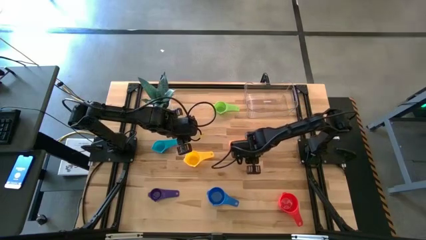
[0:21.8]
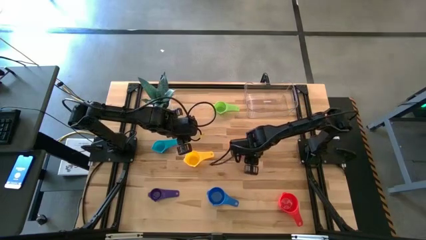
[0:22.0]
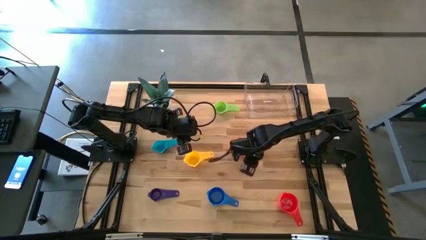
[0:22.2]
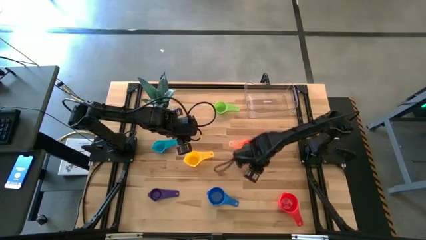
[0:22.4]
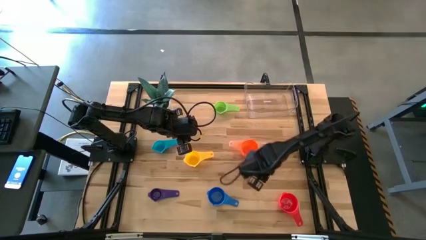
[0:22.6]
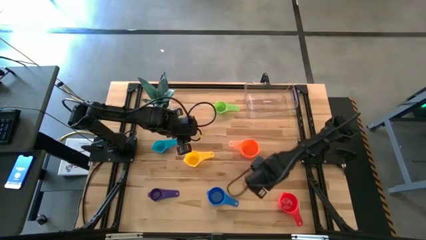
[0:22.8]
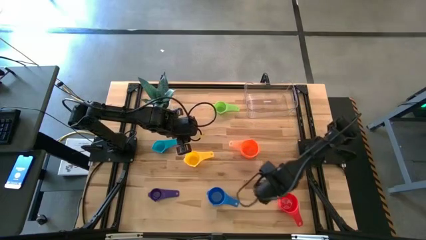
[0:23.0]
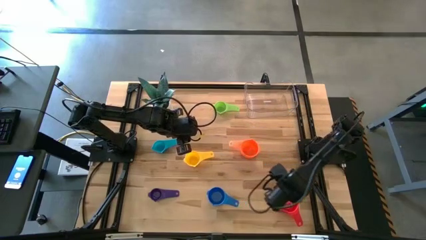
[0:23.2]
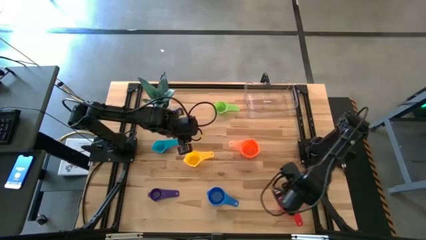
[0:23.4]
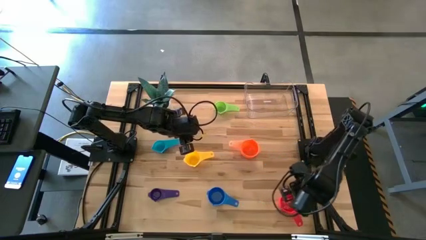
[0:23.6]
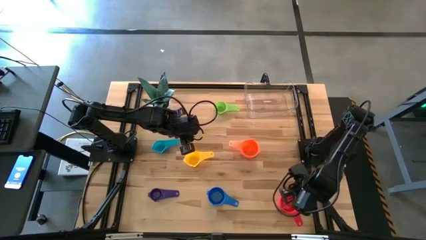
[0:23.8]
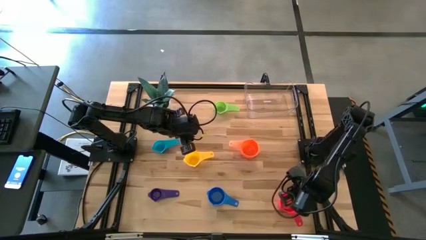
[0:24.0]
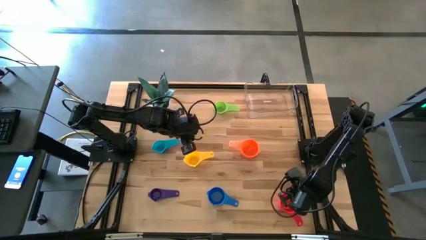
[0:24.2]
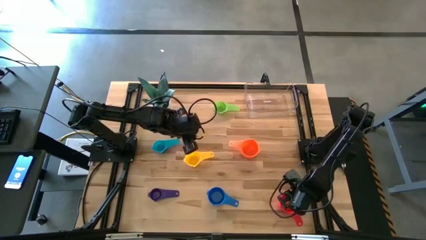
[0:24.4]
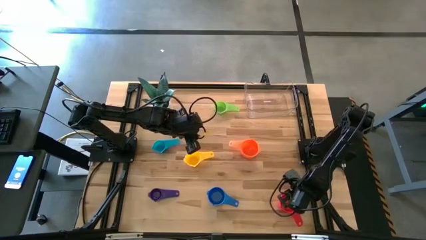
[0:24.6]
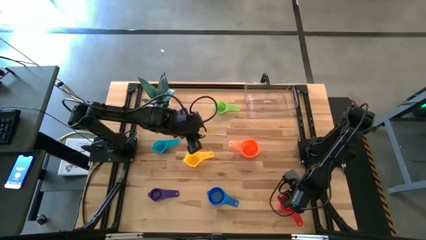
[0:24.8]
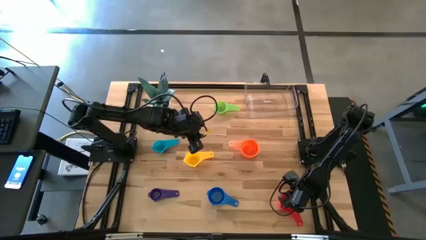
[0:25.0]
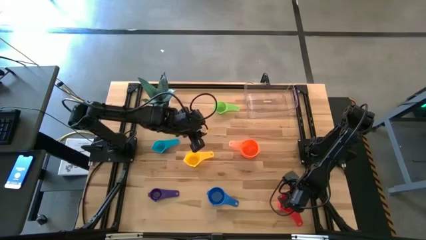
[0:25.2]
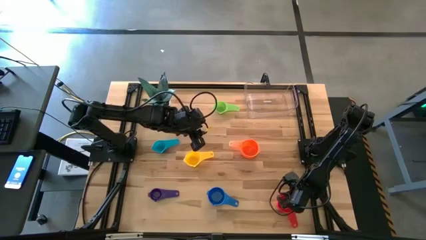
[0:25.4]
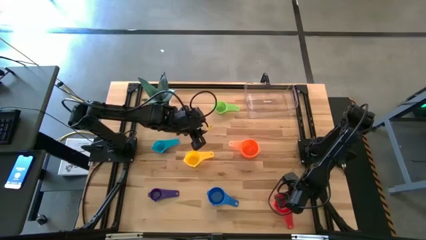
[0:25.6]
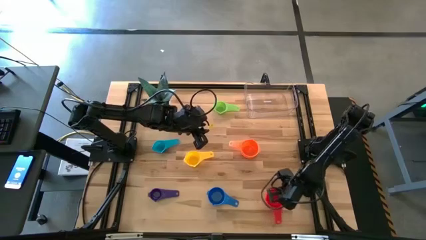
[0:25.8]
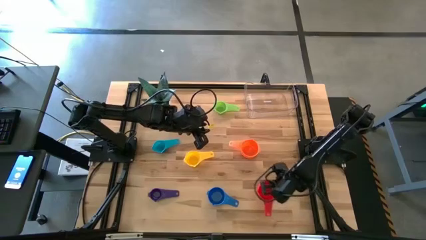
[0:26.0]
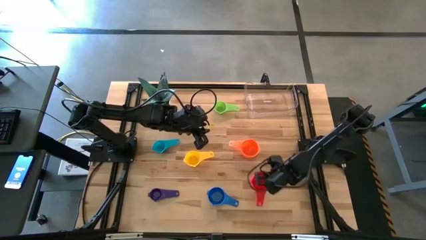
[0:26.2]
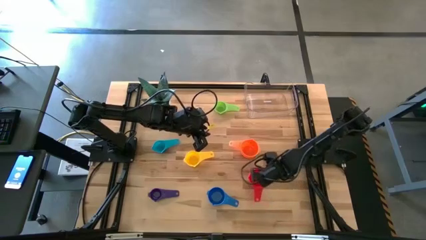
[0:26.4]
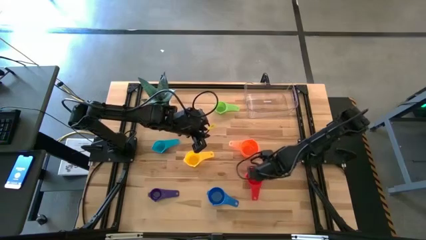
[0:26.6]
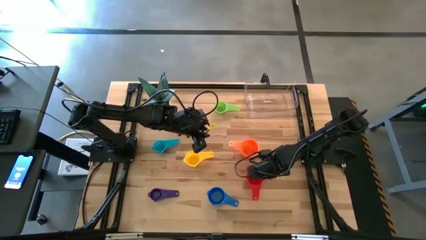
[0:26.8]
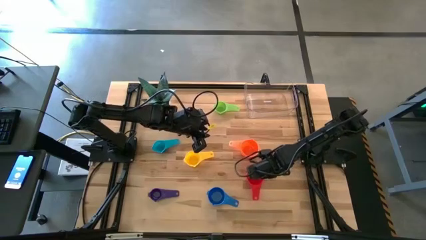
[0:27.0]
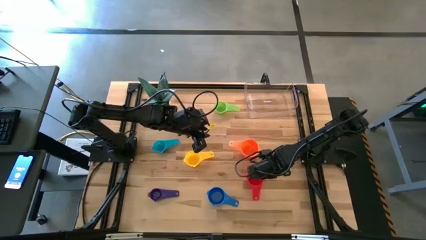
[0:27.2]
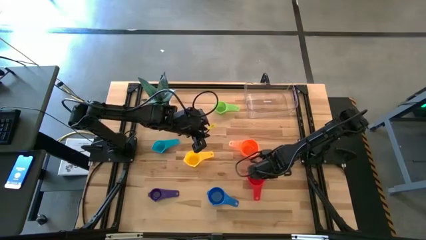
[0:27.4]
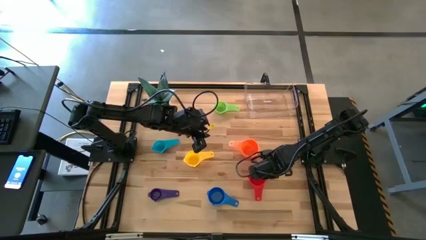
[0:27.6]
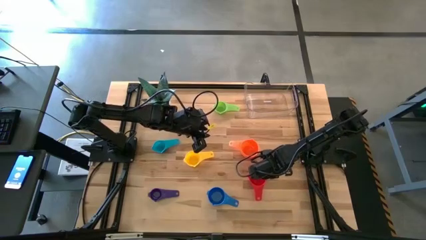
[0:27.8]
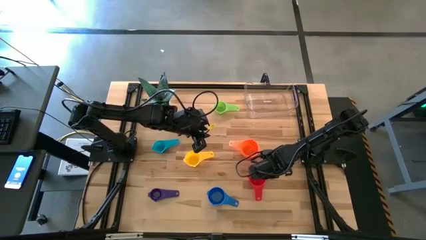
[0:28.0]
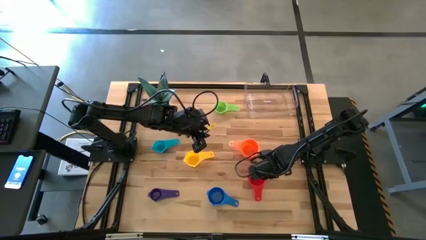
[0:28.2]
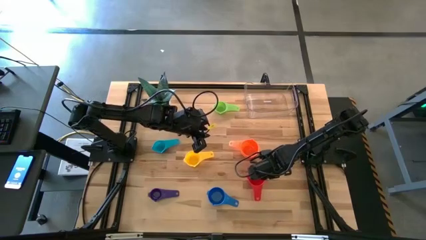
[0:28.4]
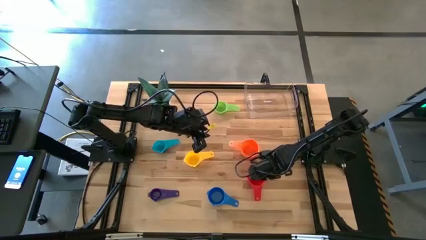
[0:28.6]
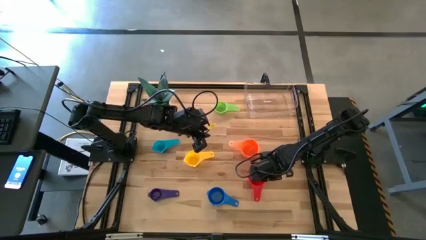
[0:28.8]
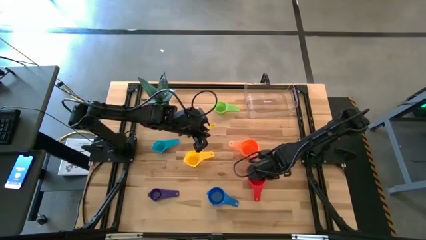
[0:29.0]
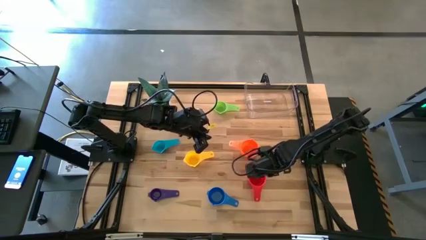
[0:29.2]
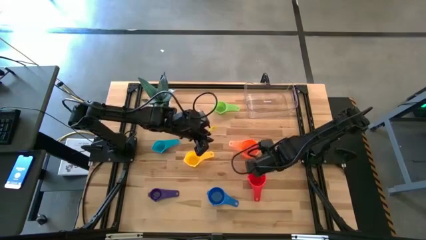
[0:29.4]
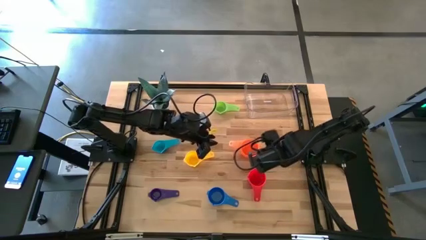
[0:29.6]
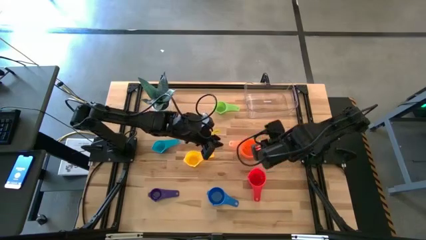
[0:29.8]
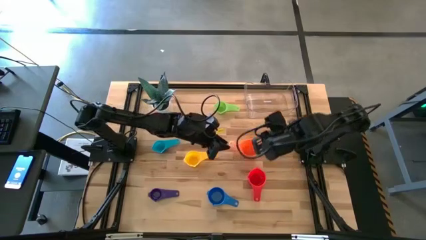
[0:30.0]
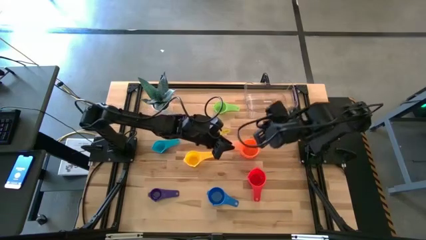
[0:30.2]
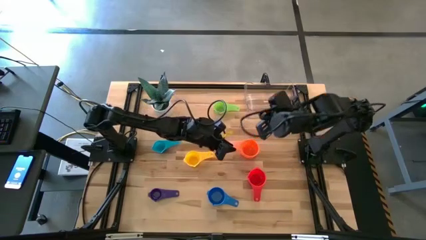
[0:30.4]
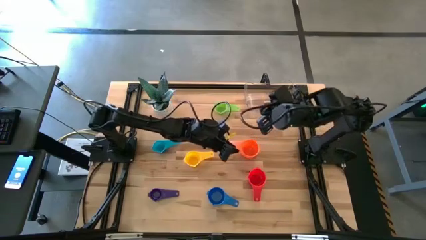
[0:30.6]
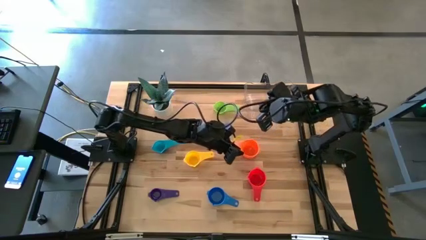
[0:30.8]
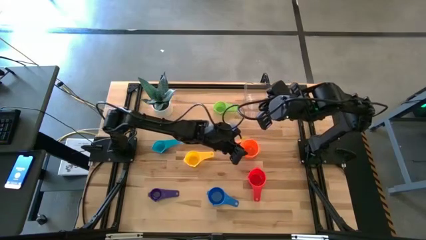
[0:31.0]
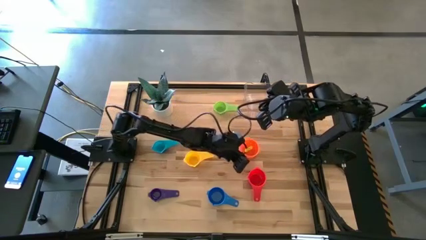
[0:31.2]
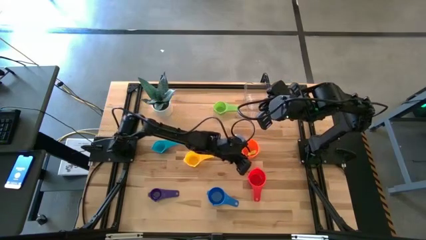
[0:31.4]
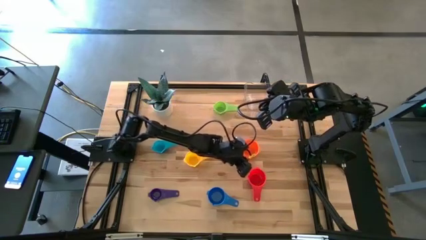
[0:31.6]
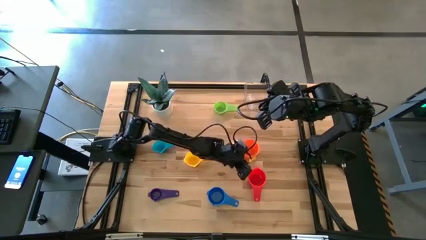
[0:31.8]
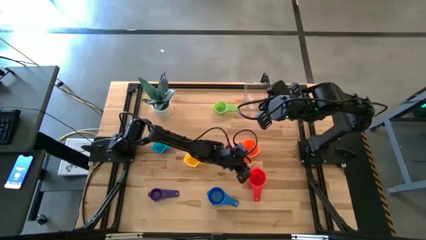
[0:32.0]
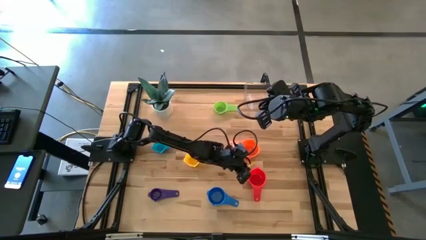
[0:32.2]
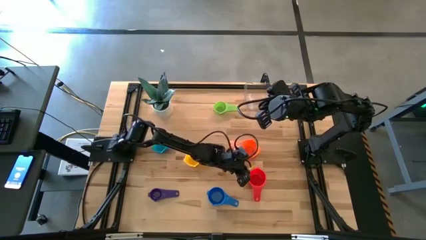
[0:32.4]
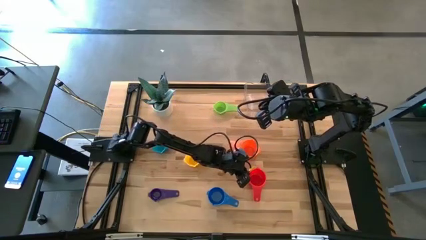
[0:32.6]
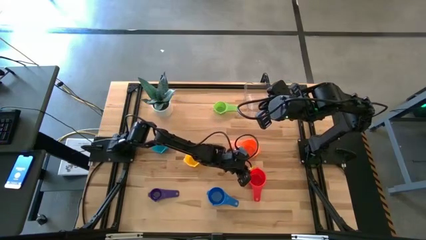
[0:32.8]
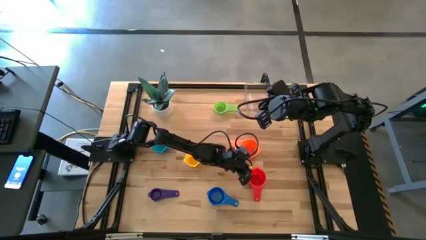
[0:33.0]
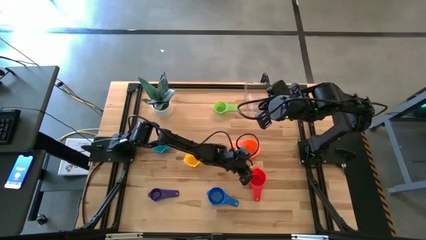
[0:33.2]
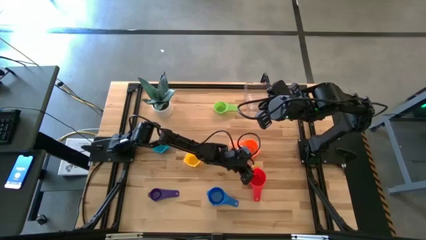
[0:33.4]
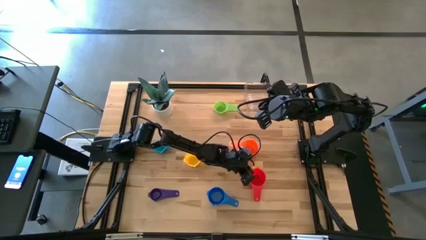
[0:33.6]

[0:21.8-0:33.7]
Task: Nest measuring cups in basket
Stack the red measuring cup on top of the orange measuring cup

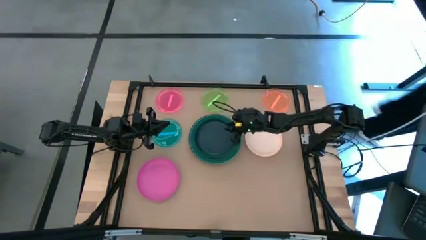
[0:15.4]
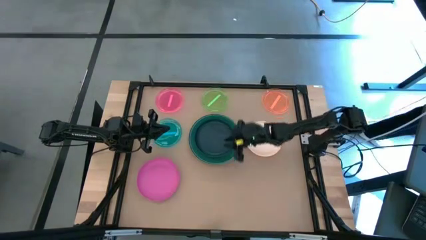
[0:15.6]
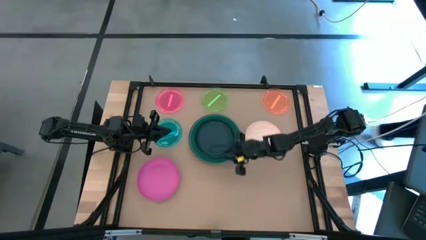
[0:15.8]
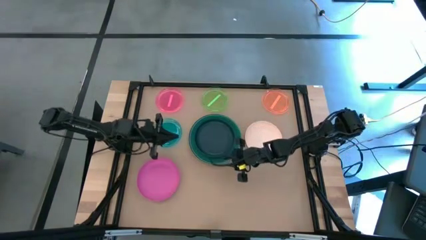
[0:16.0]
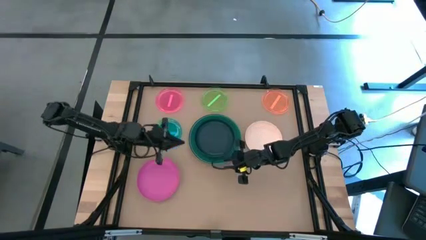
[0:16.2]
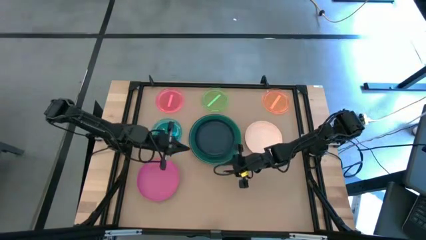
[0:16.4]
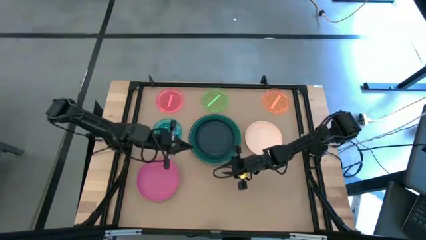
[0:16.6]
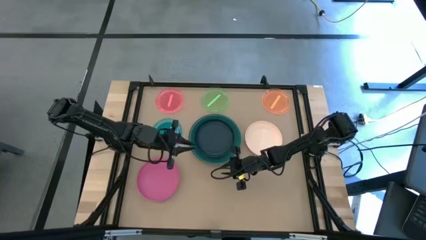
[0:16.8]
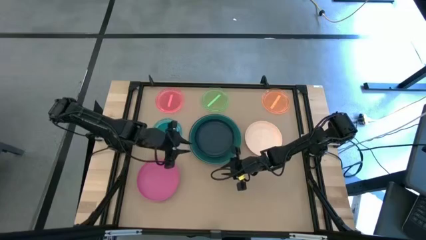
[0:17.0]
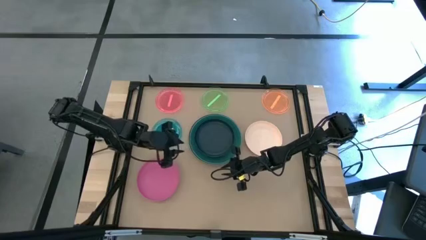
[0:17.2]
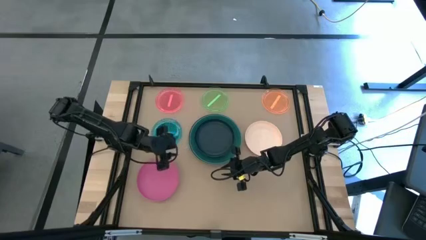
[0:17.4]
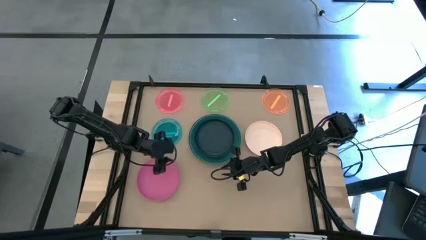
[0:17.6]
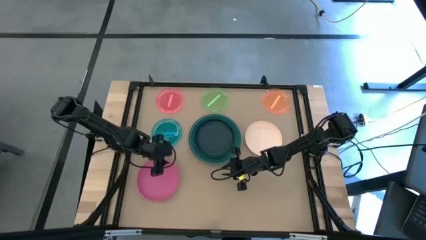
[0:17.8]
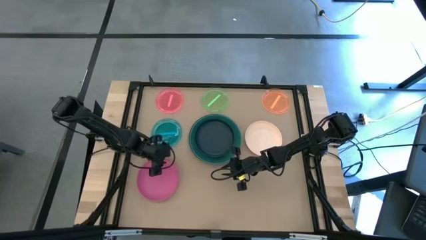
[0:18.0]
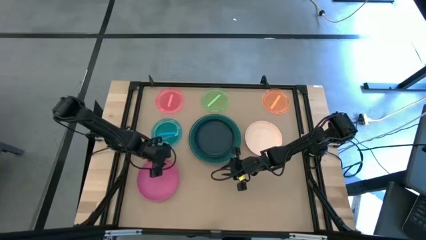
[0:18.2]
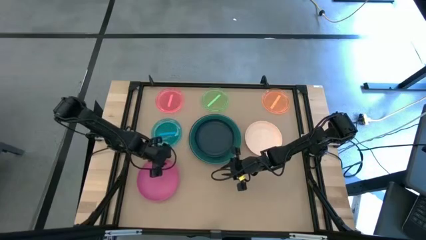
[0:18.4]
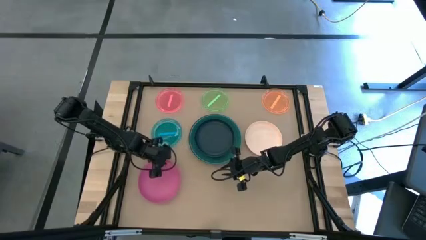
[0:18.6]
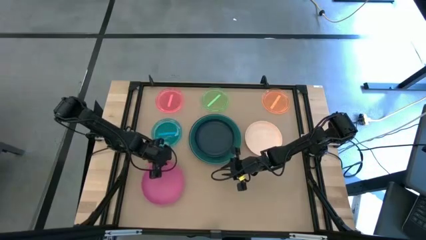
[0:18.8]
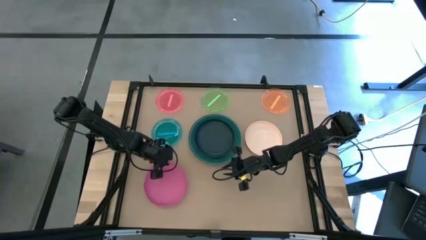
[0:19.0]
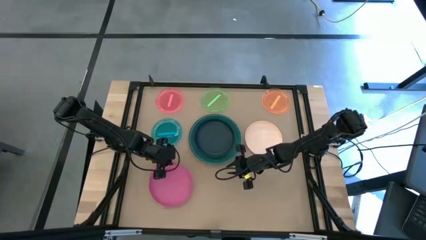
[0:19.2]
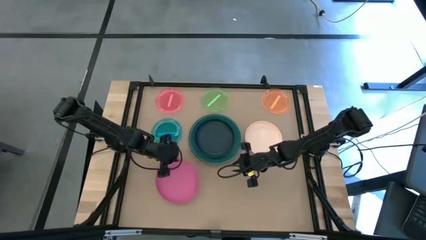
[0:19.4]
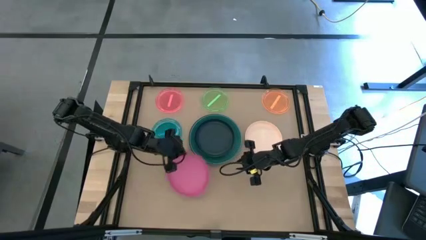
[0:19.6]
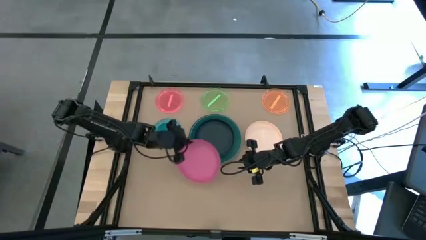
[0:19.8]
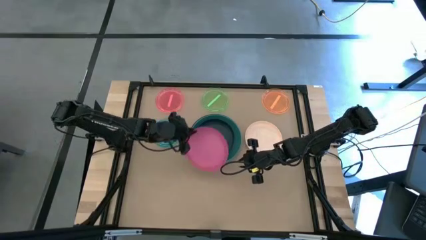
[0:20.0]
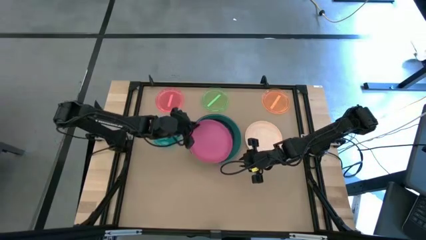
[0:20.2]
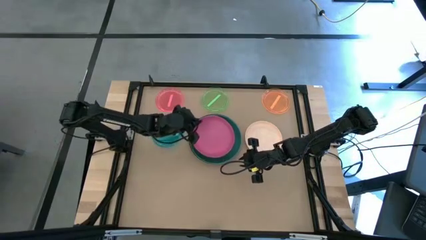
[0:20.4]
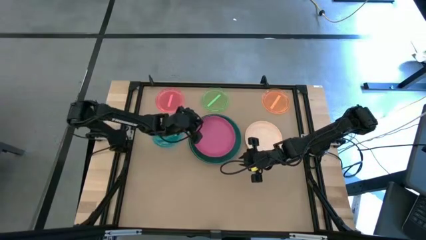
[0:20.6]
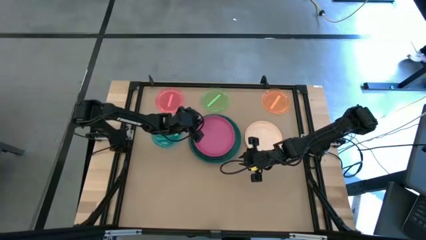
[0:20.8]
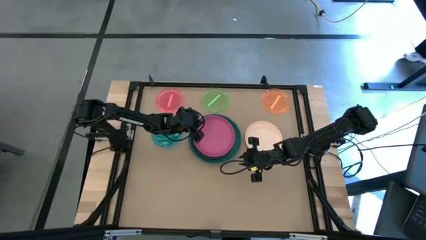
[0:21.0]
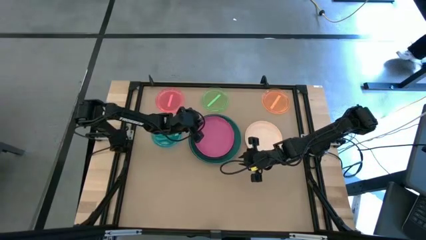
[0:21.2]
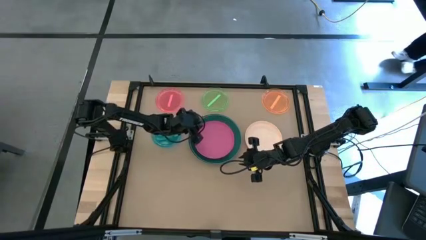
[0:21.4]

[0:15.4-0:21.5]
Task: Stack plastic plates
Stack the pink plate on top of the dark blue plate
